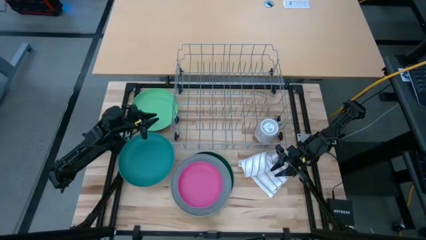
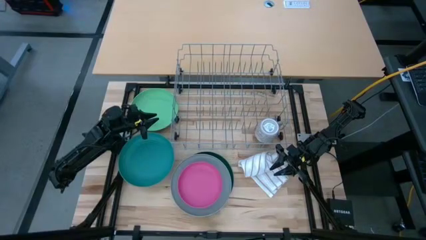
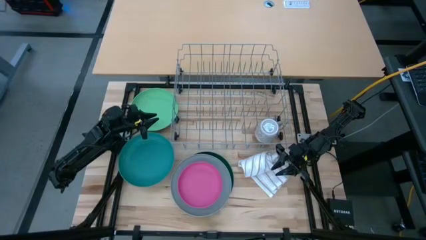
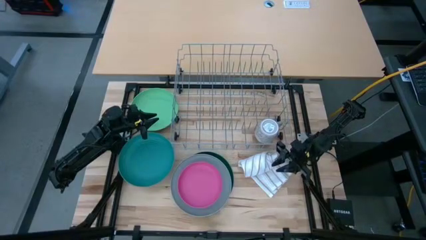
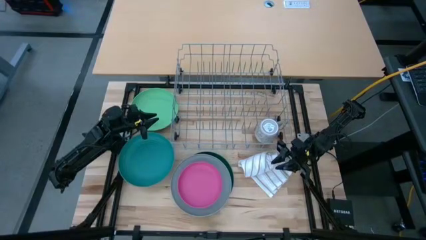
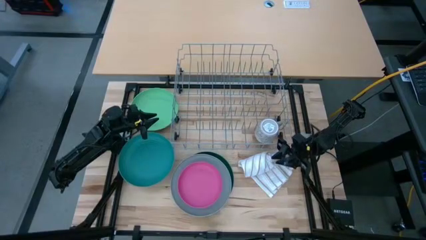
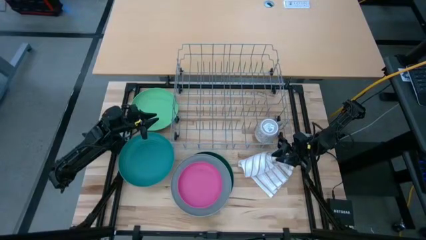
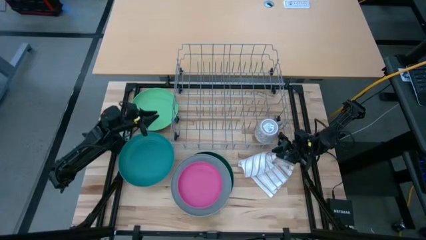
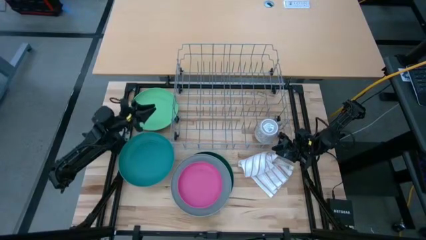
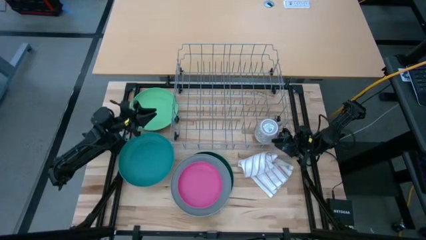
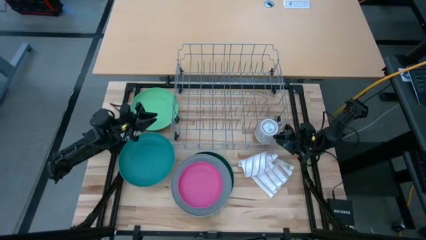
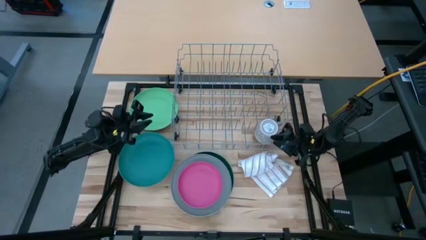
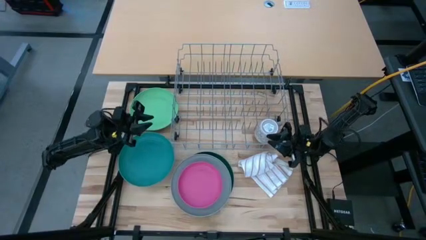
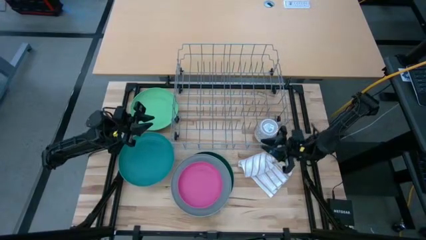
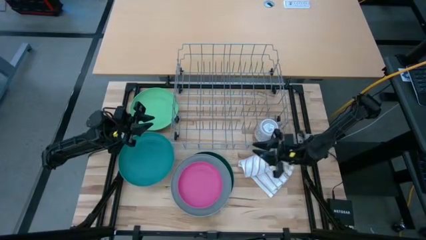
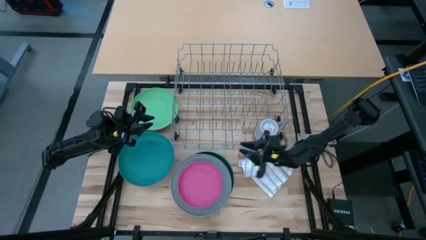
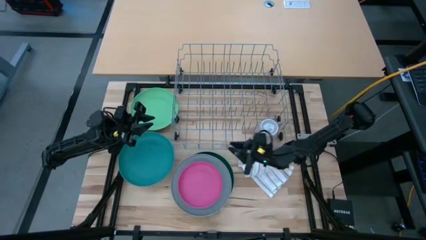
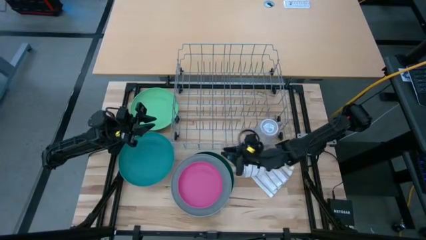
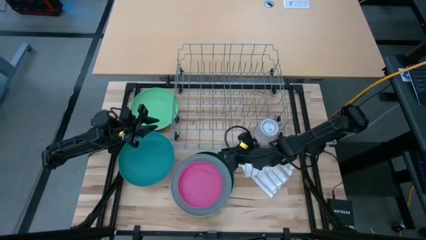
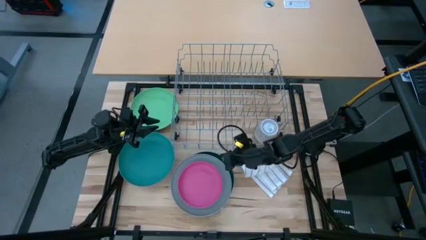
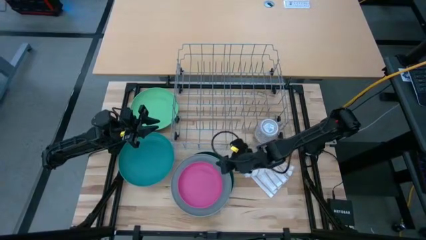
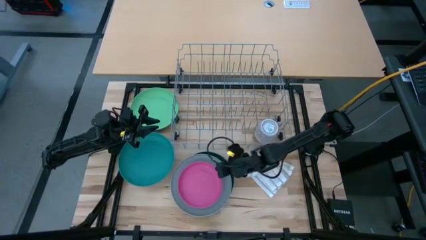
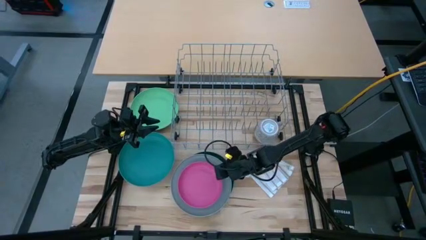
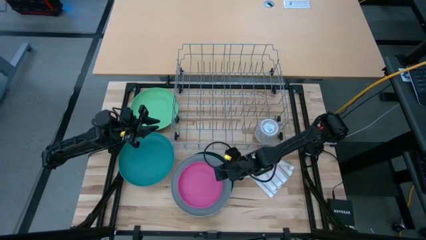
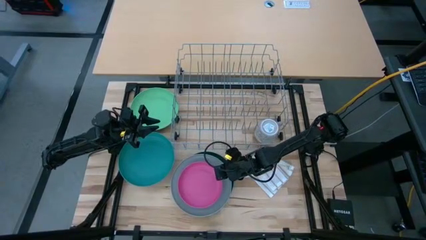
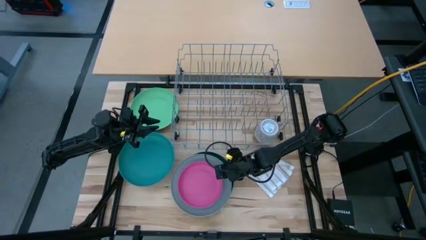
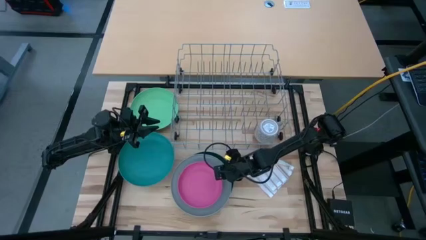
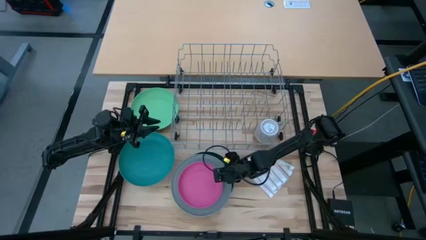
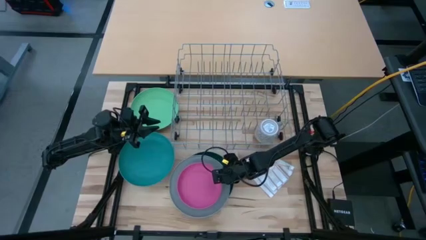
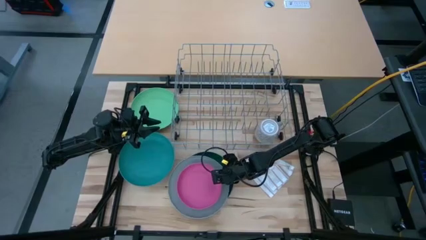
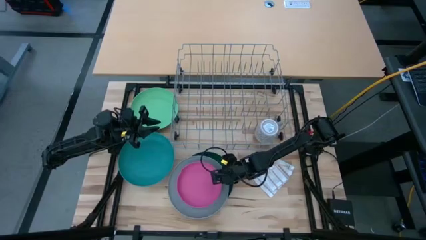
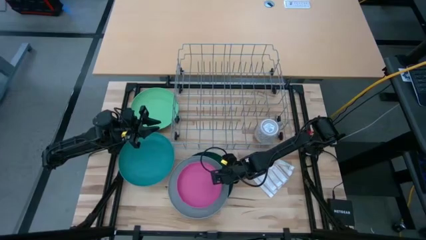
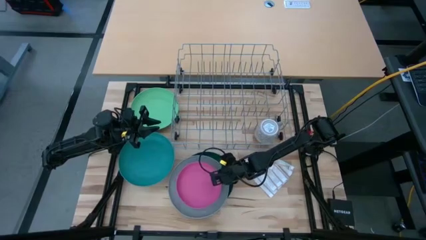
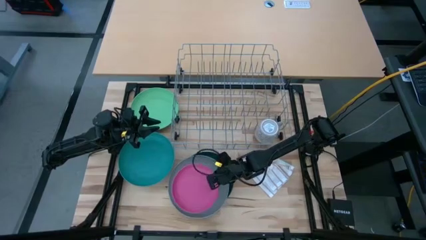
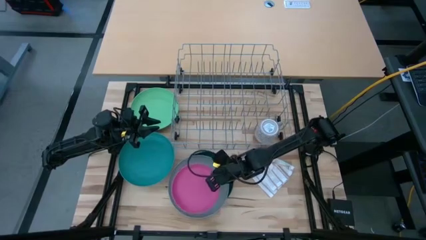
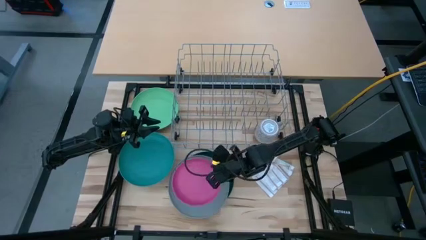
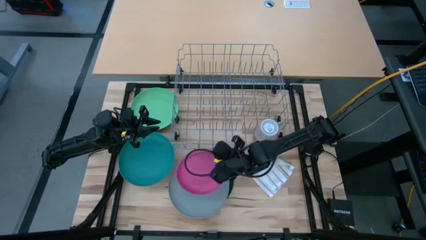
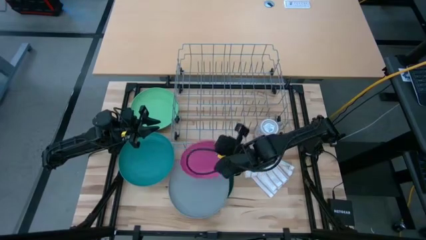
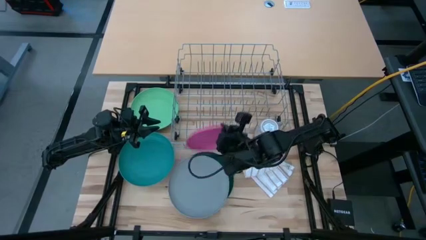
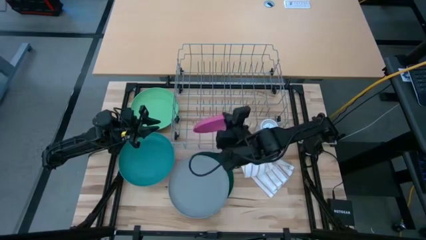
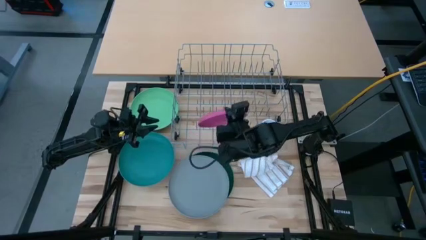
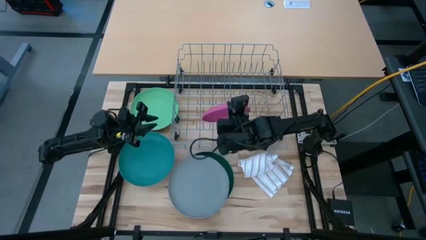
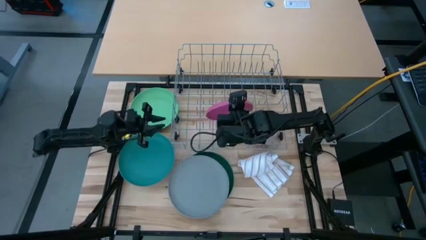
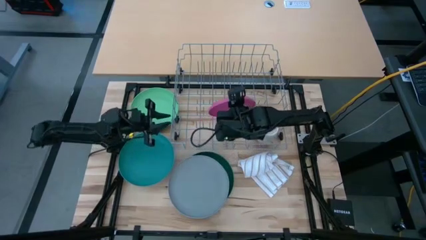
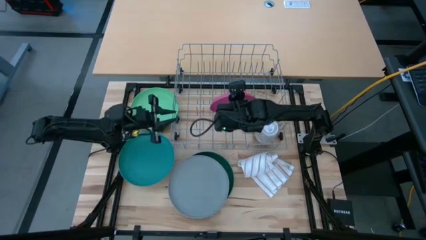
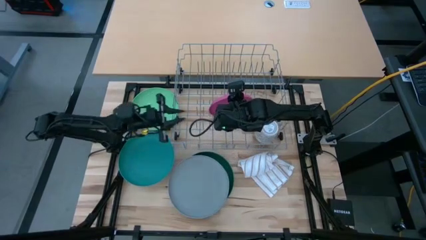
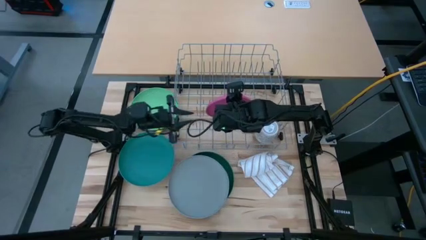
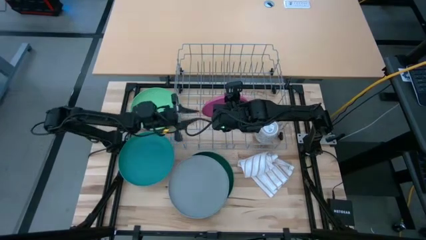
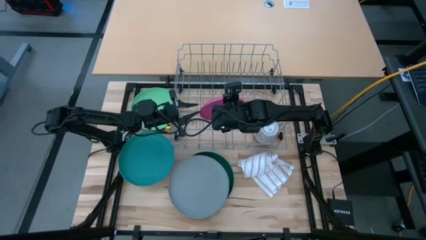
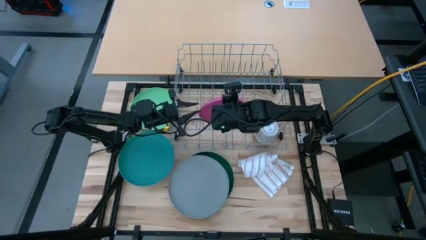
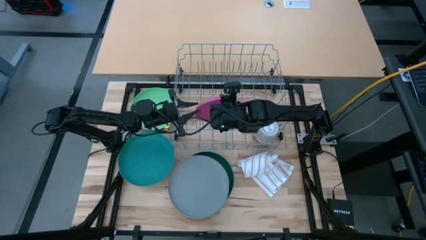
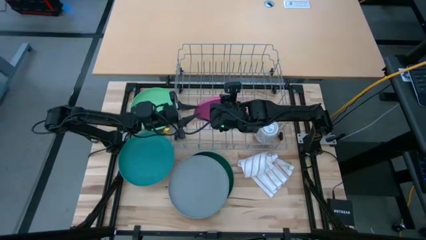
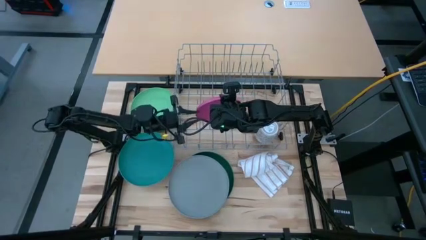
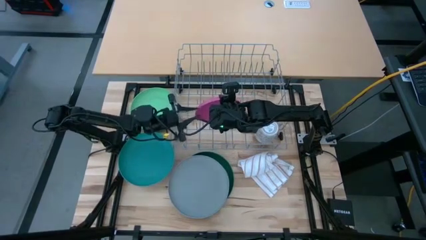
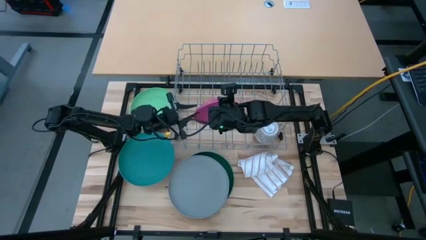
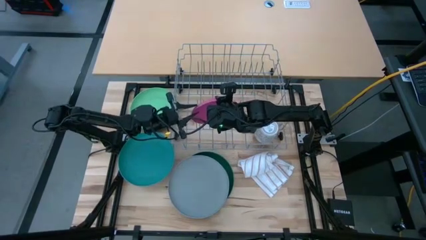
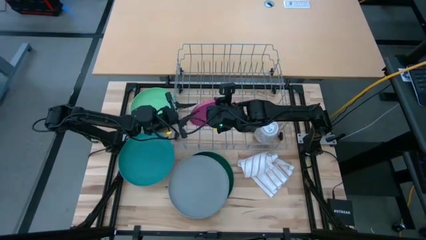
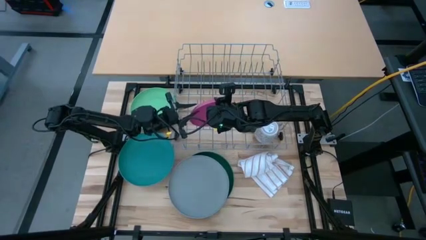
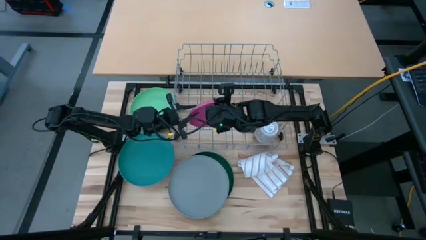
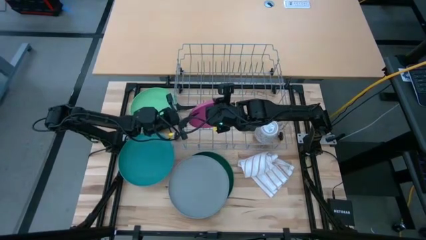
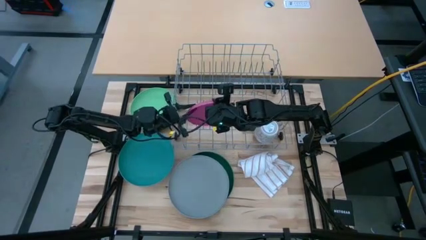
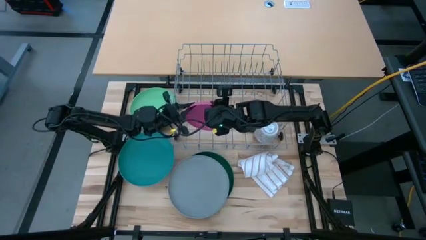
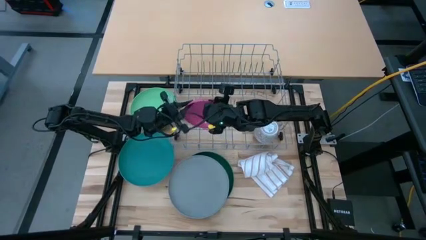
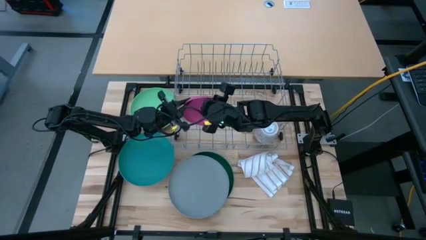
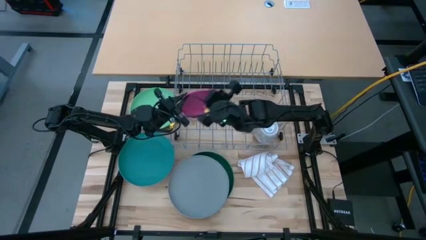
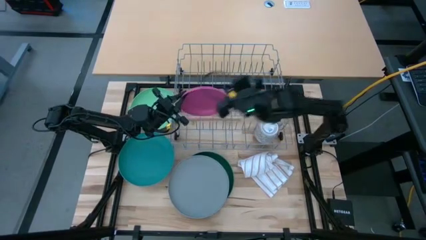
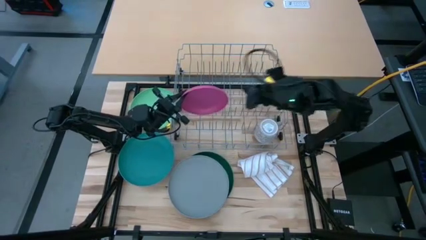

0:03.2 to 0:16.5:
Task: Sort dishes
Put the pink plate in the dish rack
